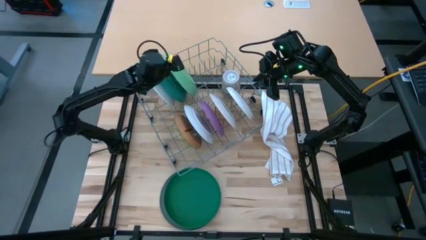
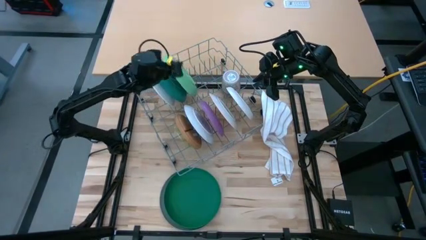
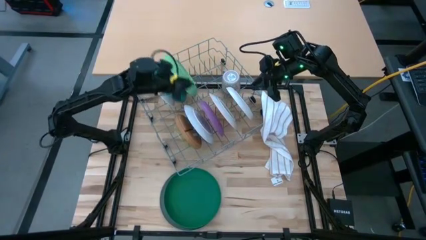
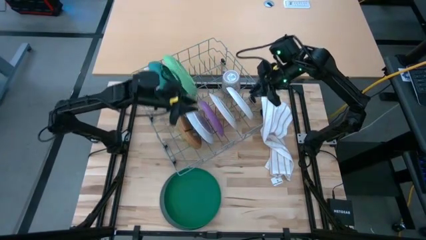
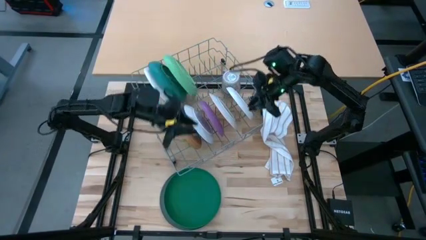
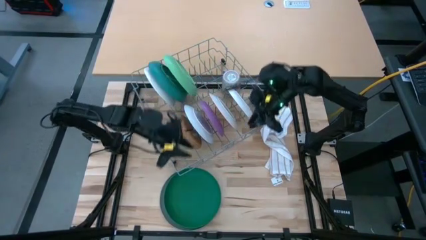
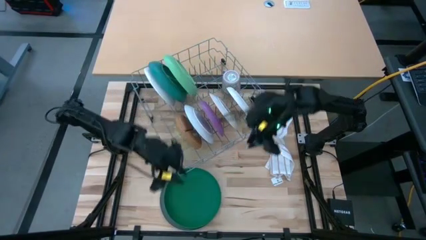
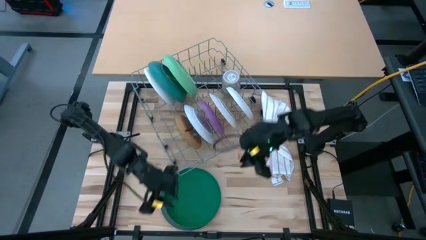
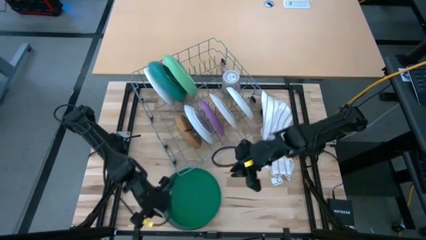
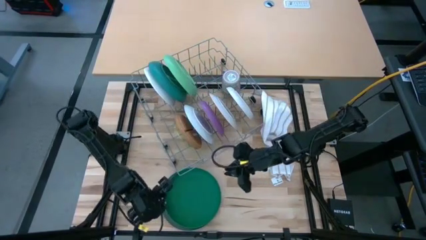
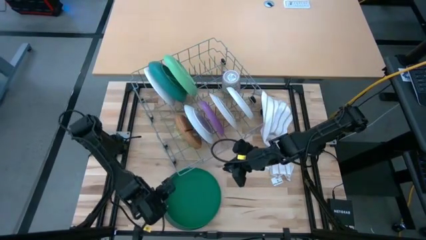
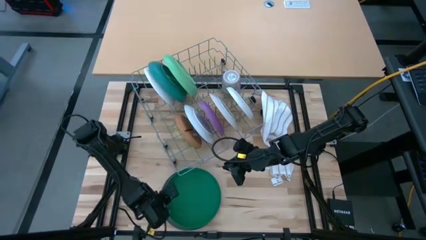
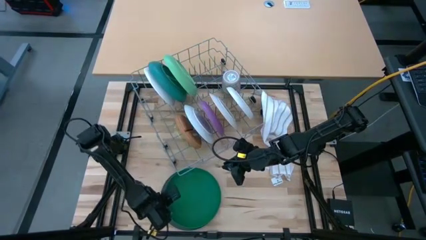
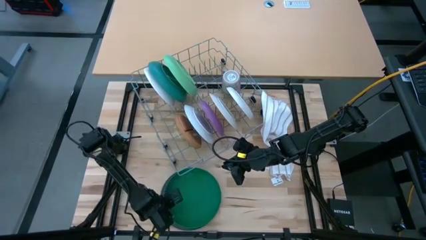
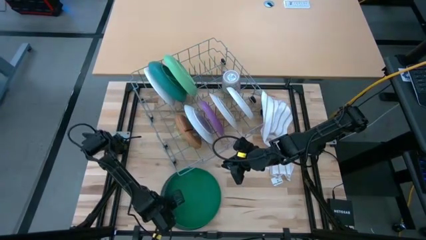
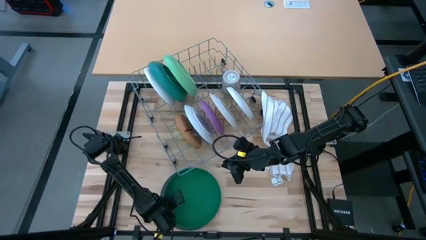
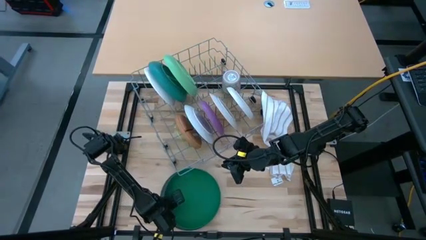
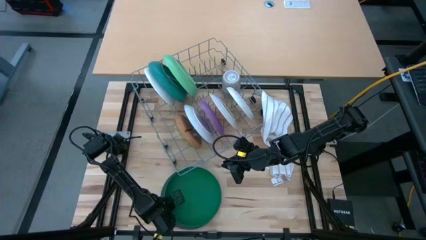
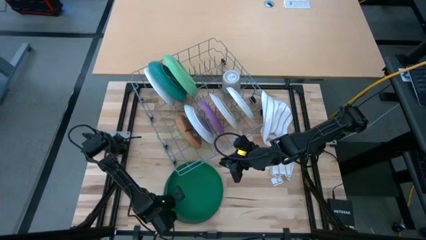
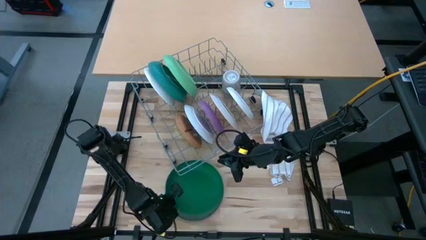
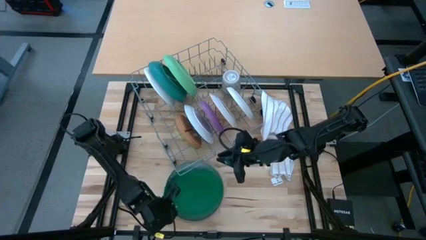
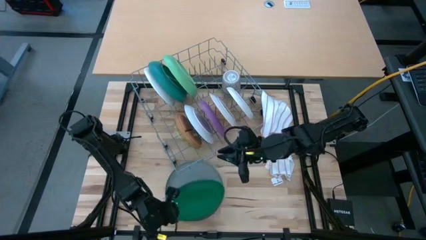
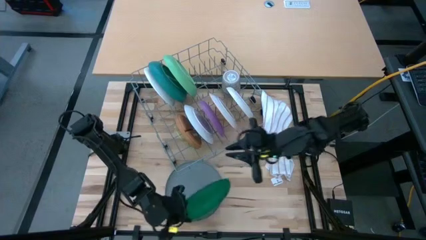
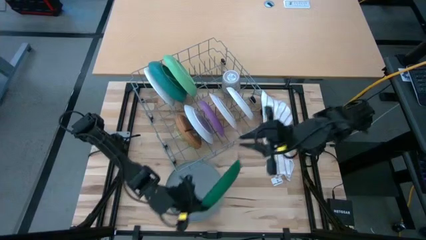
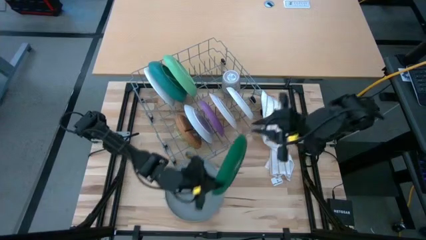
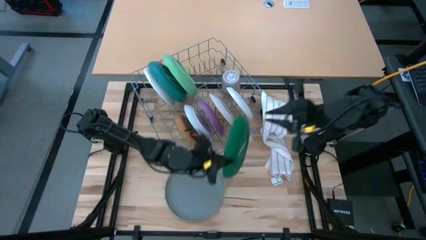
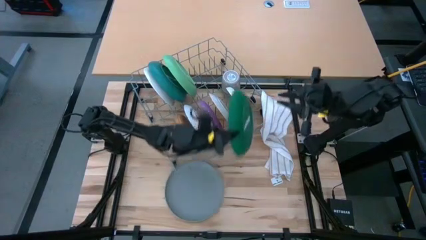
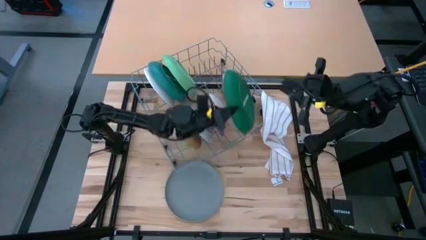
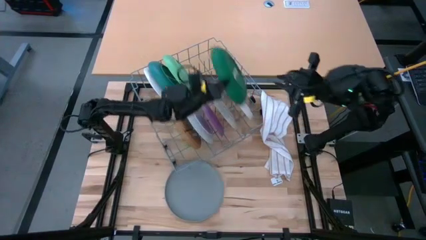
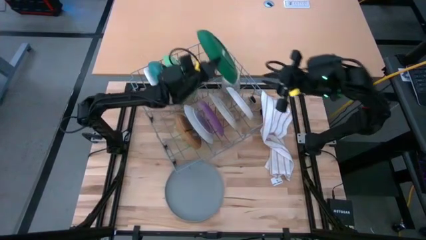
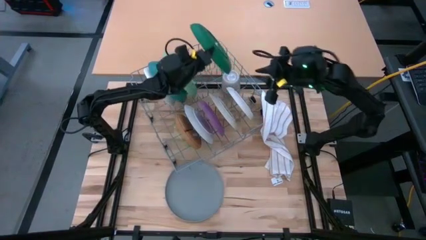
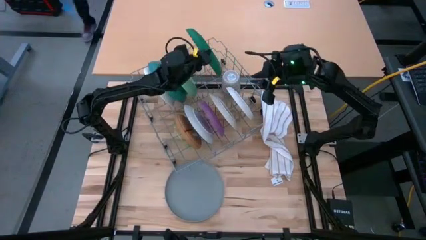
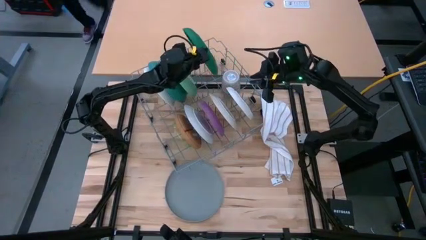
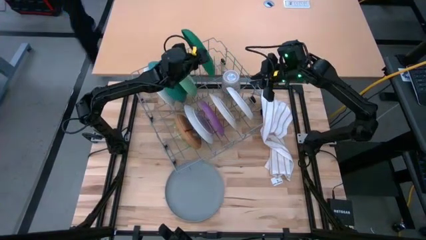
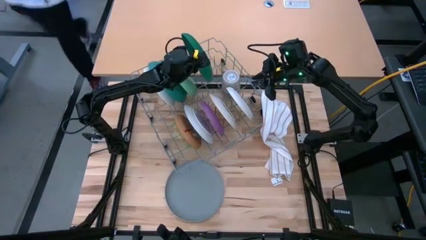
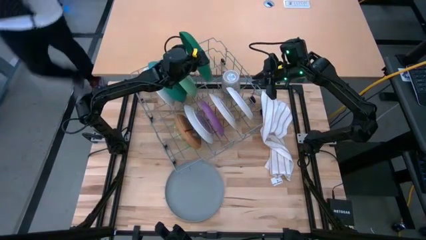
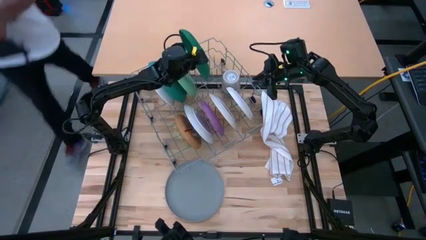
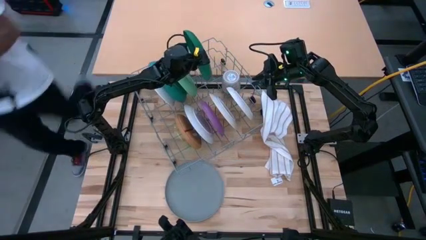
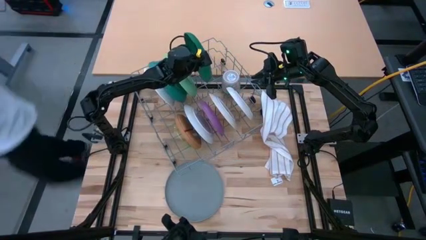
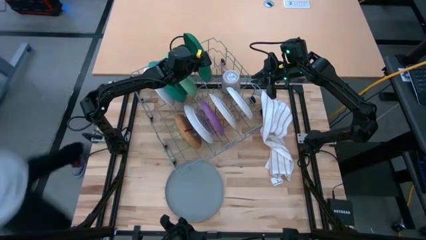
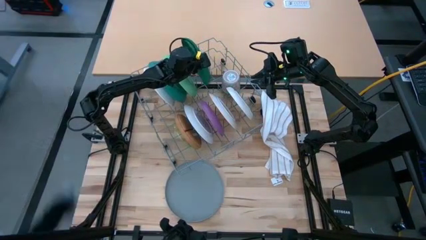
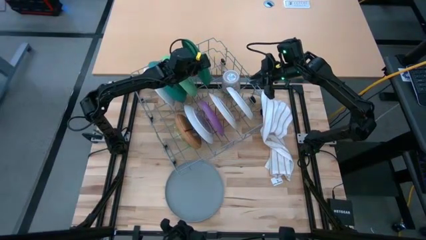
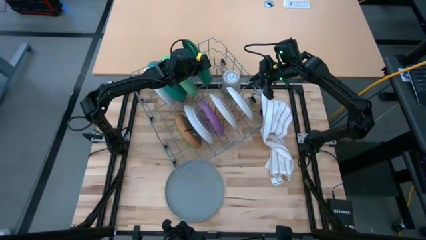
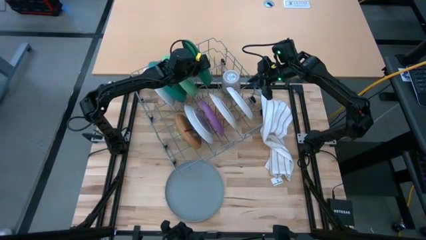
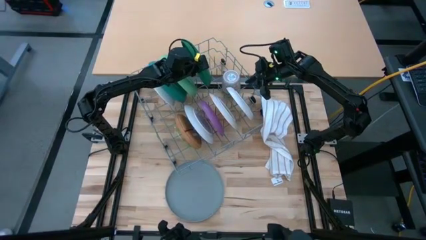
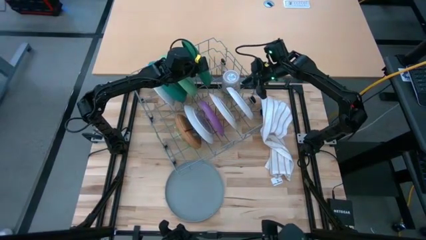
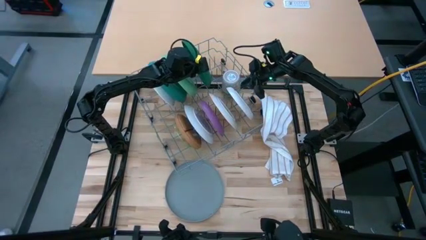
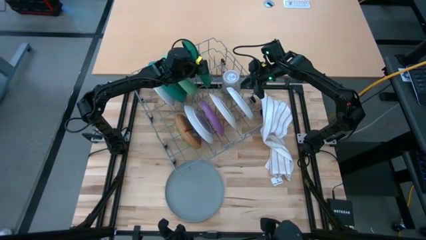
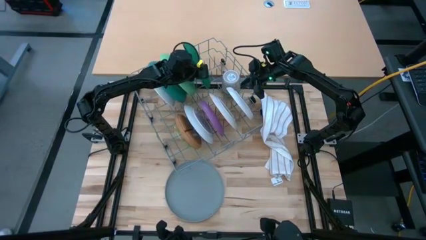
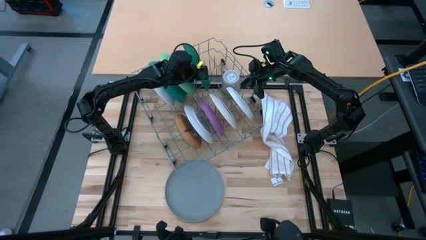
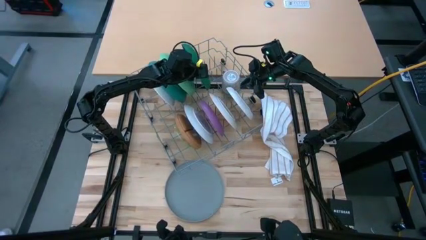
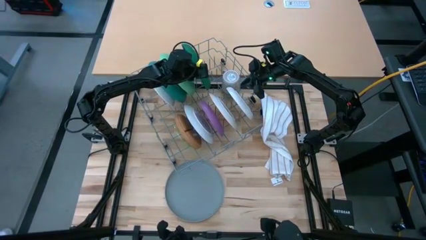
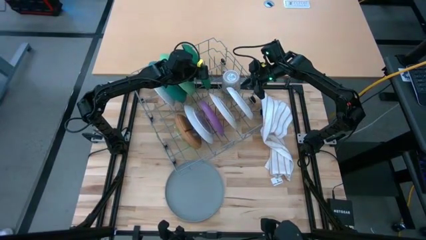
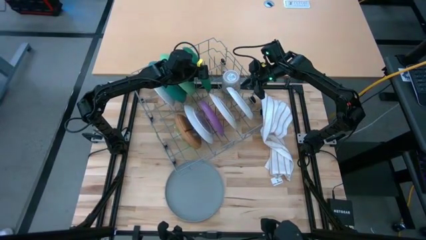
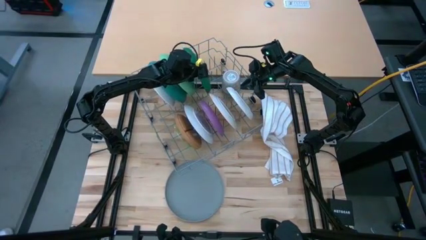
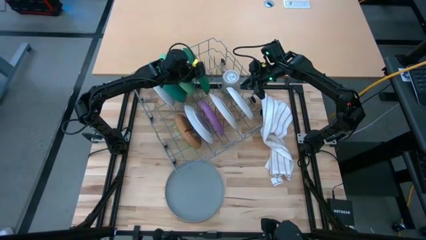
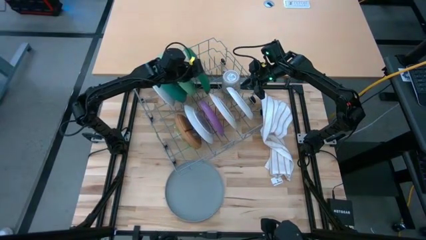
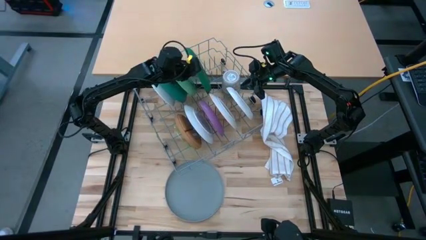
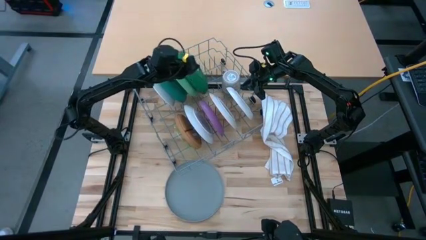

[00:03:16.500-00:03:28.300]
Task: Sort dishes
Put the green plate into the dish rack
